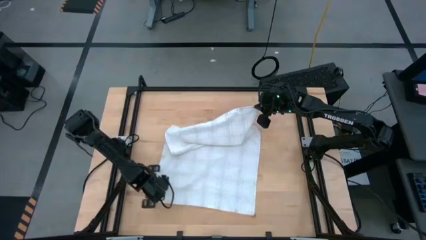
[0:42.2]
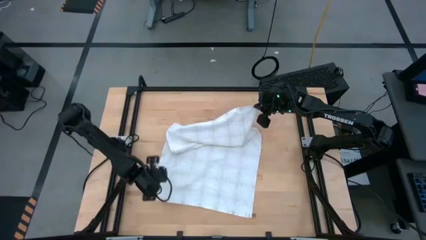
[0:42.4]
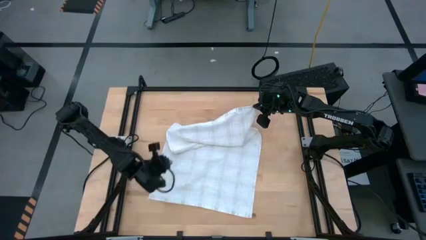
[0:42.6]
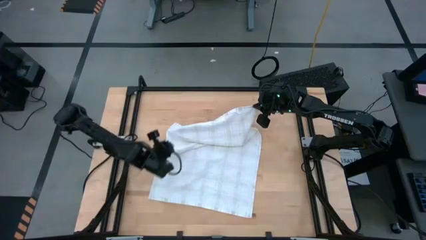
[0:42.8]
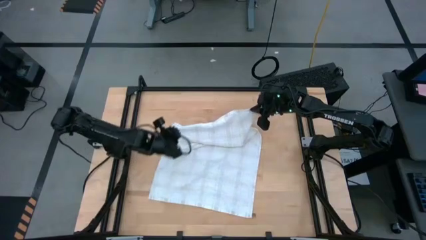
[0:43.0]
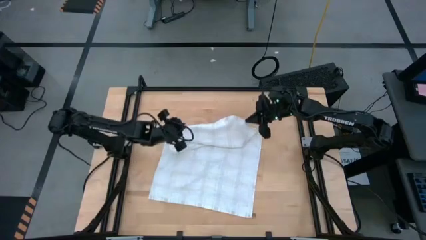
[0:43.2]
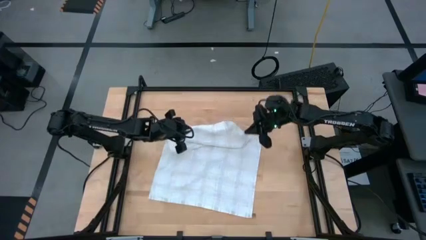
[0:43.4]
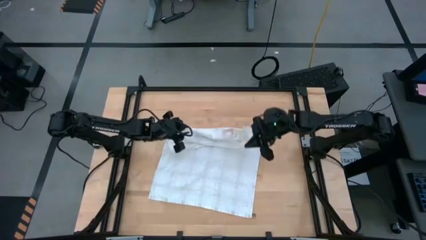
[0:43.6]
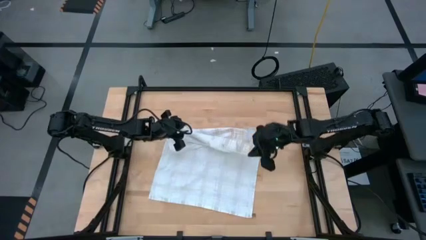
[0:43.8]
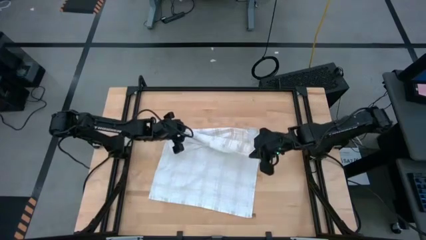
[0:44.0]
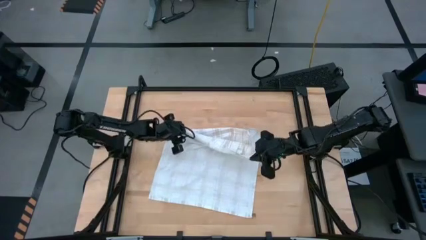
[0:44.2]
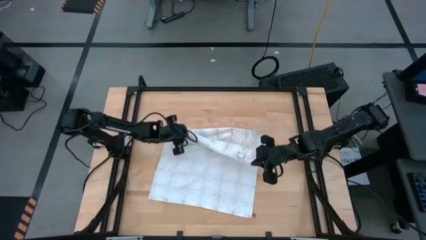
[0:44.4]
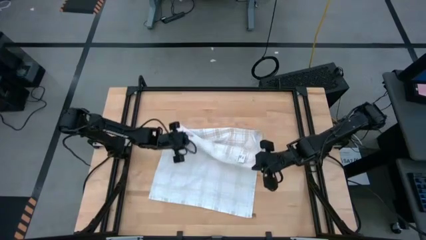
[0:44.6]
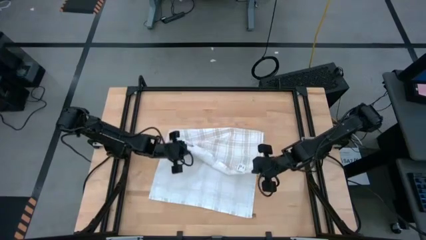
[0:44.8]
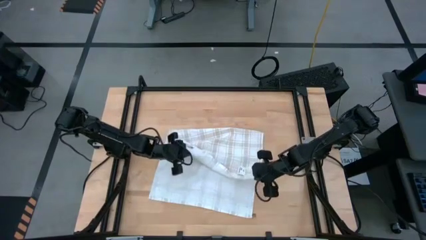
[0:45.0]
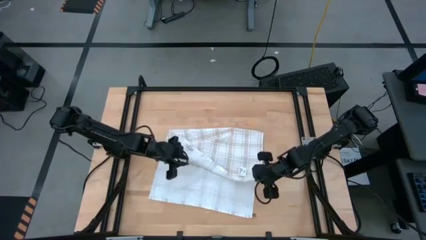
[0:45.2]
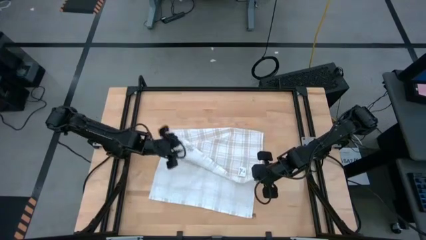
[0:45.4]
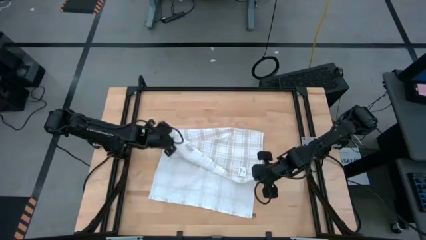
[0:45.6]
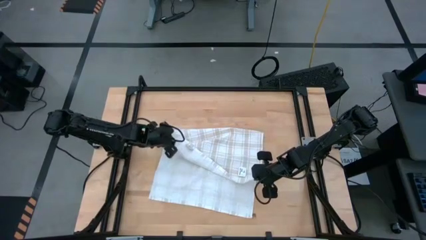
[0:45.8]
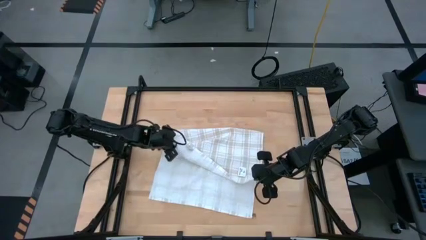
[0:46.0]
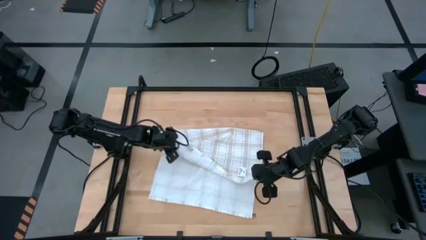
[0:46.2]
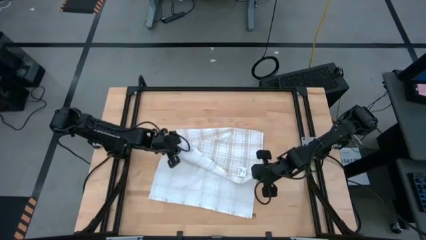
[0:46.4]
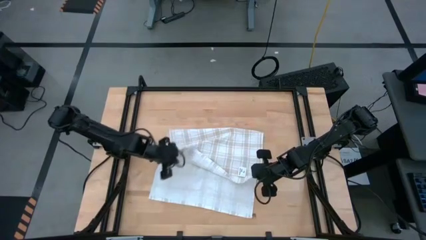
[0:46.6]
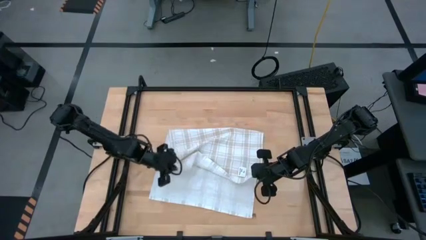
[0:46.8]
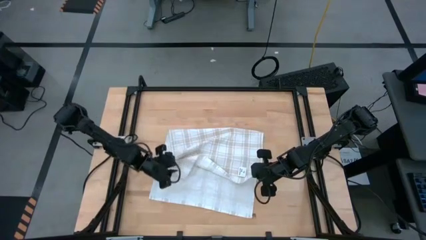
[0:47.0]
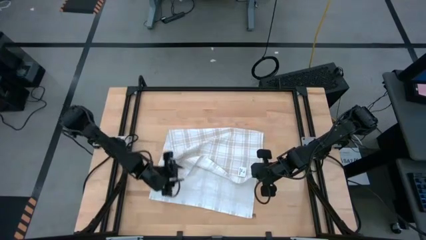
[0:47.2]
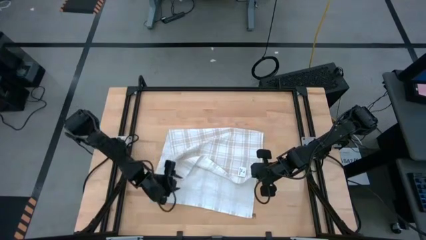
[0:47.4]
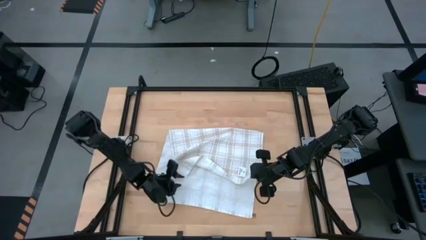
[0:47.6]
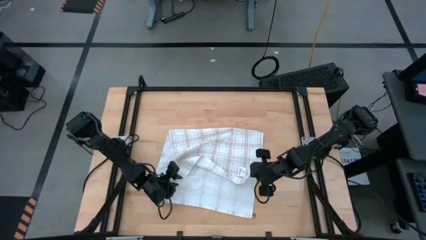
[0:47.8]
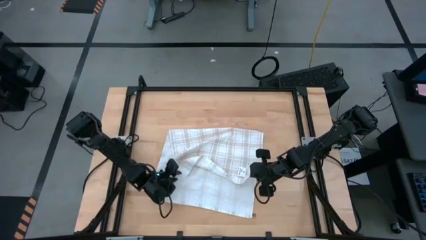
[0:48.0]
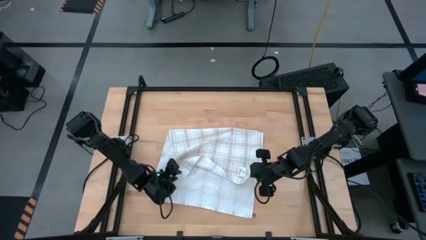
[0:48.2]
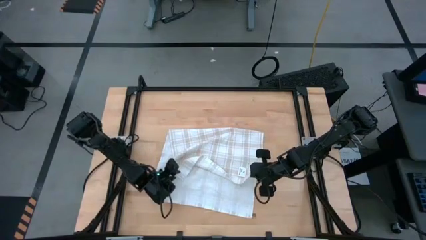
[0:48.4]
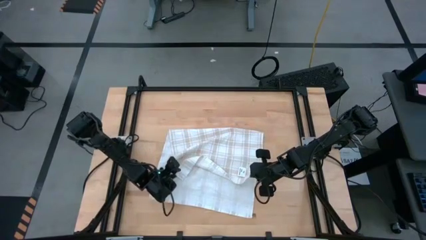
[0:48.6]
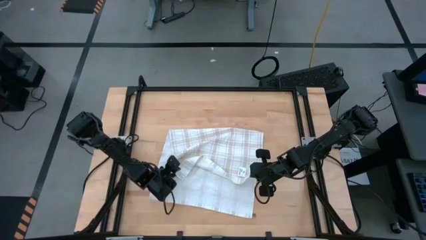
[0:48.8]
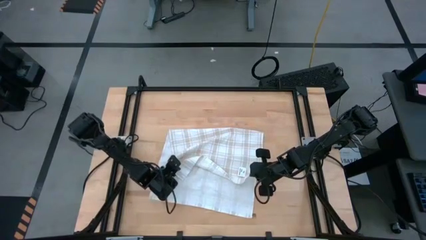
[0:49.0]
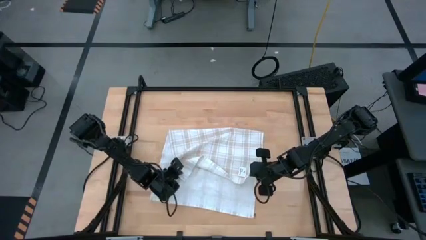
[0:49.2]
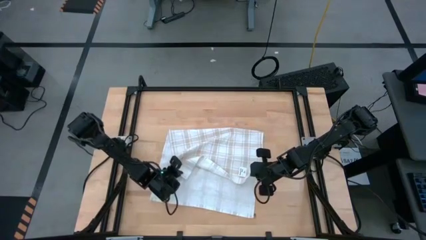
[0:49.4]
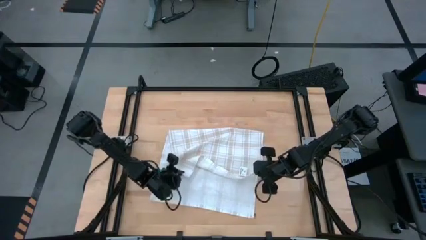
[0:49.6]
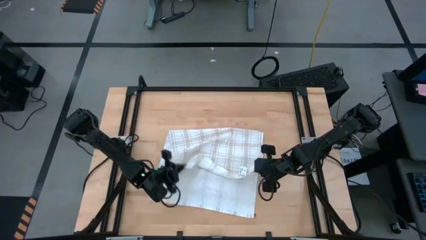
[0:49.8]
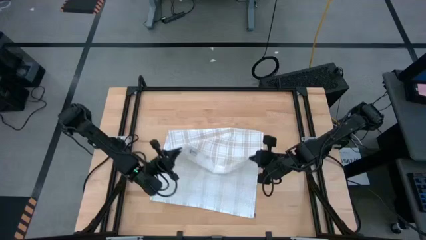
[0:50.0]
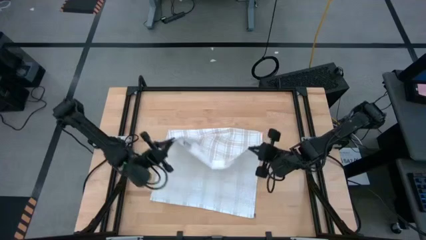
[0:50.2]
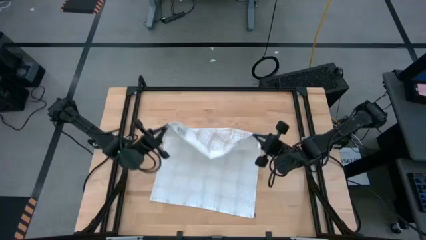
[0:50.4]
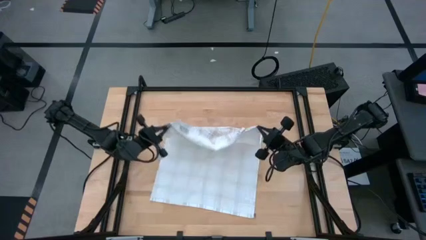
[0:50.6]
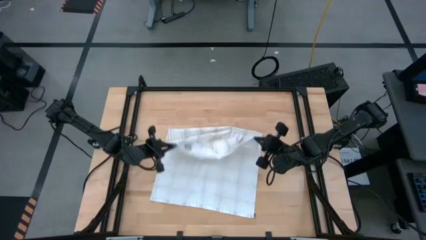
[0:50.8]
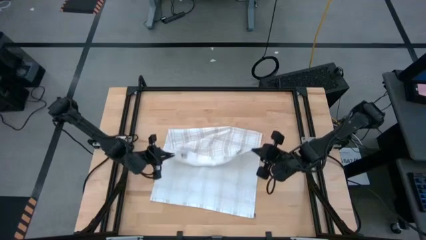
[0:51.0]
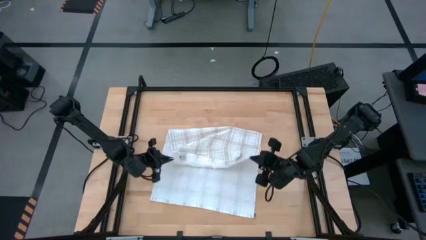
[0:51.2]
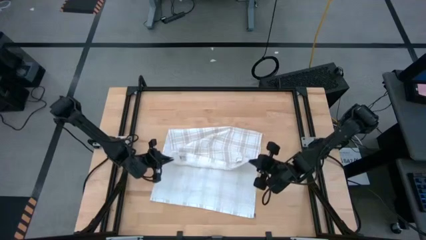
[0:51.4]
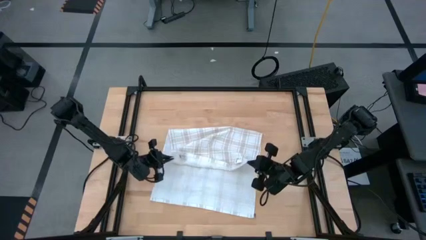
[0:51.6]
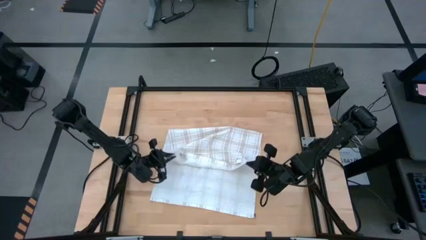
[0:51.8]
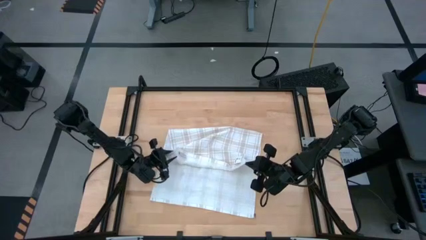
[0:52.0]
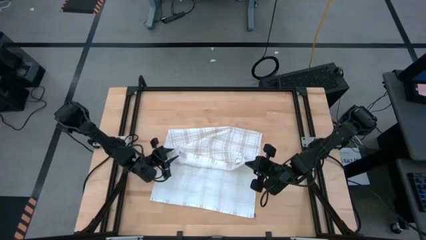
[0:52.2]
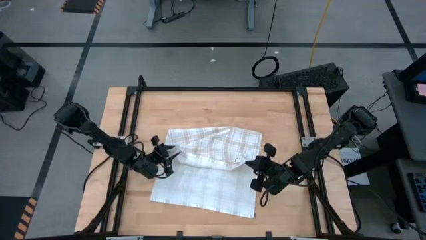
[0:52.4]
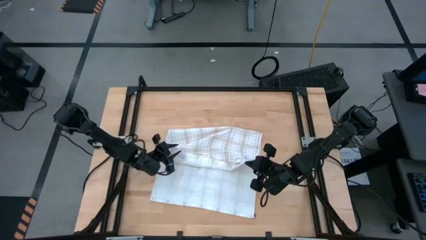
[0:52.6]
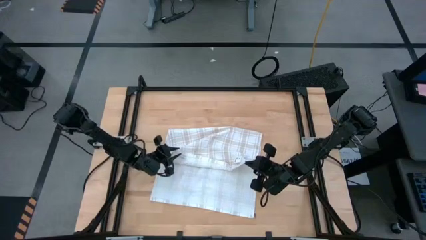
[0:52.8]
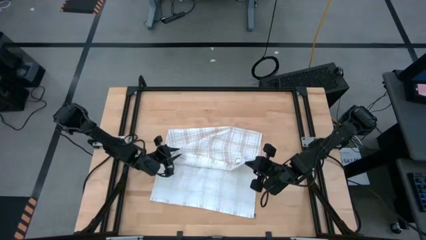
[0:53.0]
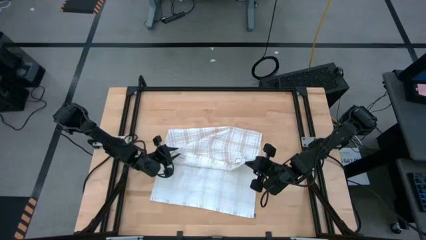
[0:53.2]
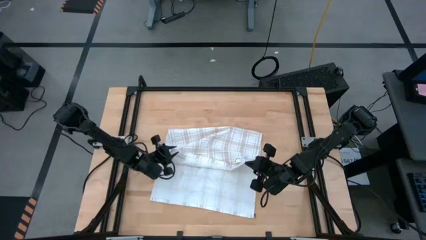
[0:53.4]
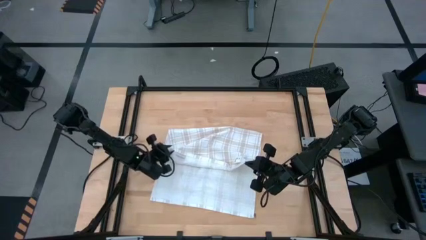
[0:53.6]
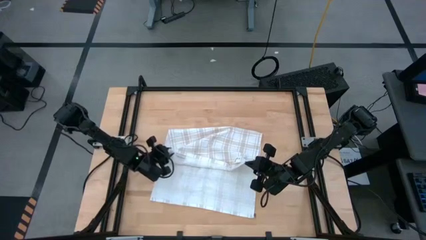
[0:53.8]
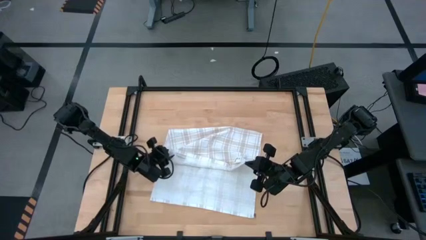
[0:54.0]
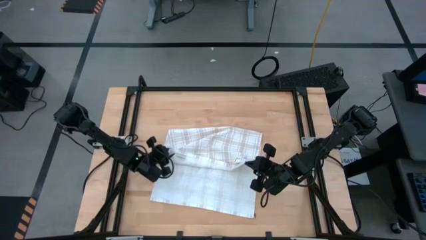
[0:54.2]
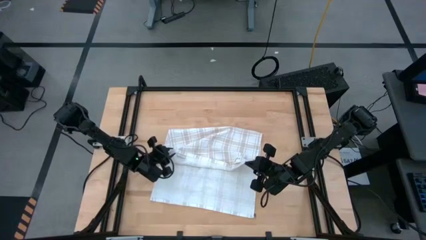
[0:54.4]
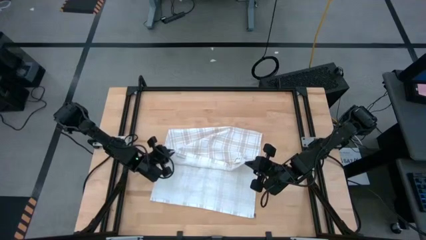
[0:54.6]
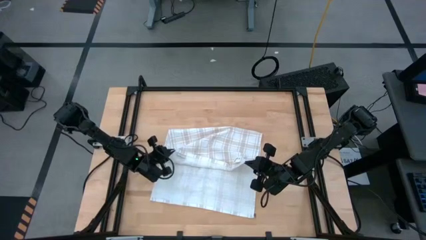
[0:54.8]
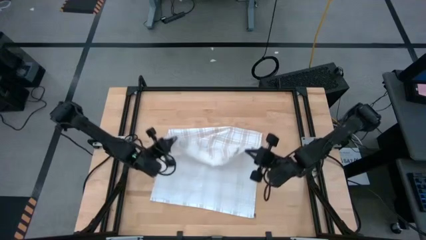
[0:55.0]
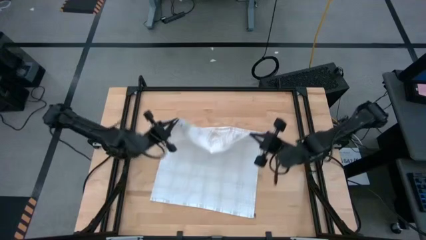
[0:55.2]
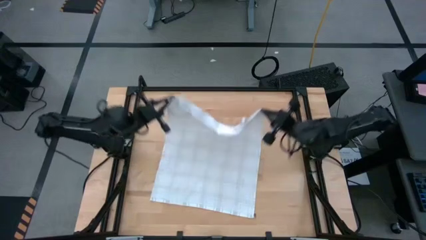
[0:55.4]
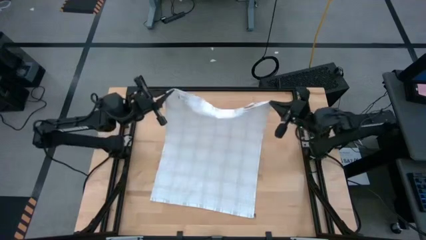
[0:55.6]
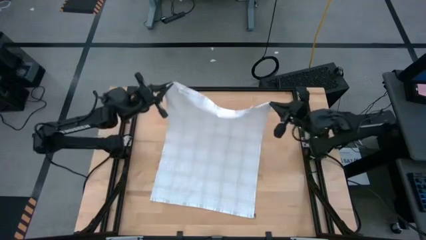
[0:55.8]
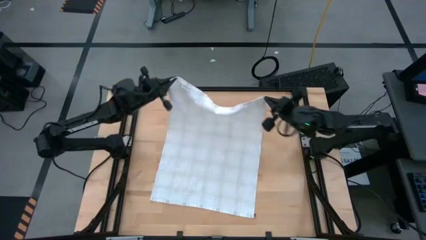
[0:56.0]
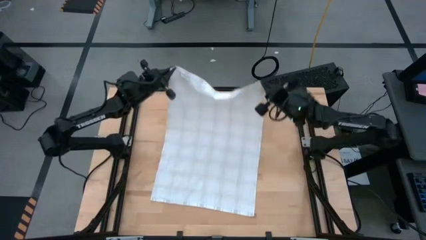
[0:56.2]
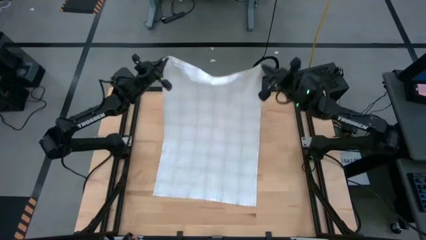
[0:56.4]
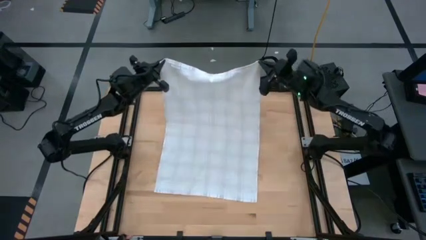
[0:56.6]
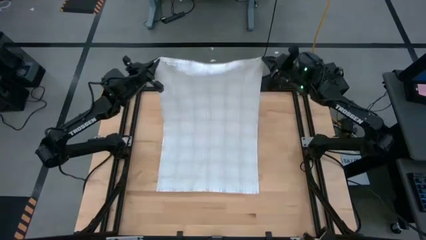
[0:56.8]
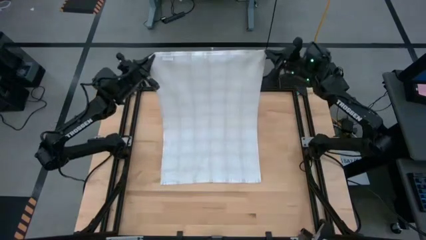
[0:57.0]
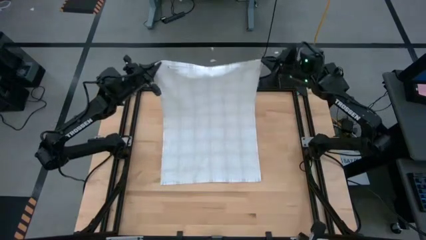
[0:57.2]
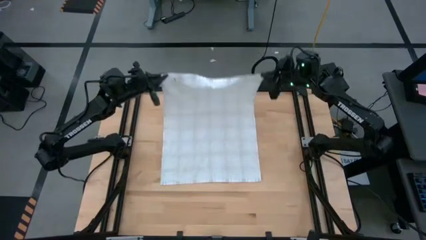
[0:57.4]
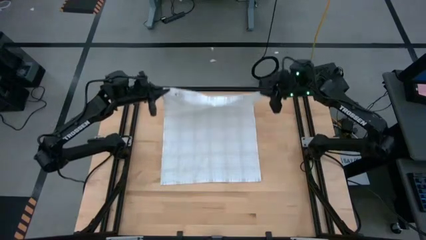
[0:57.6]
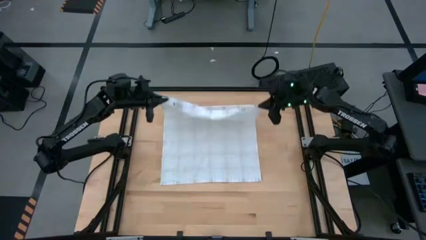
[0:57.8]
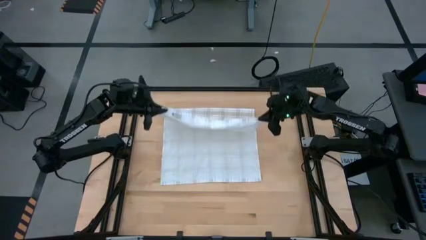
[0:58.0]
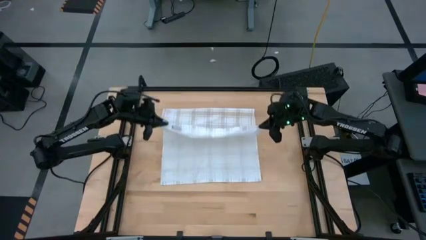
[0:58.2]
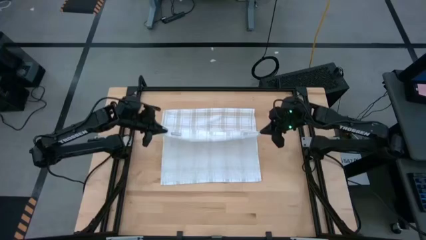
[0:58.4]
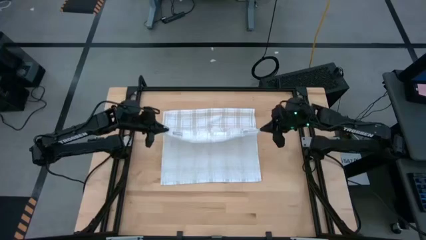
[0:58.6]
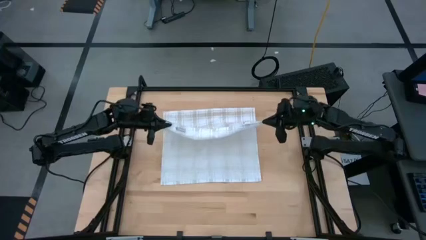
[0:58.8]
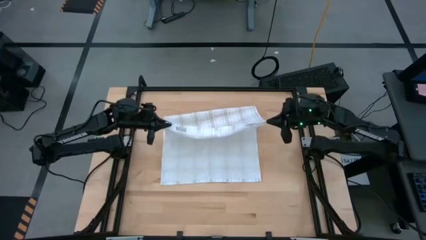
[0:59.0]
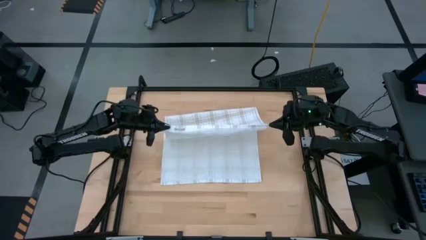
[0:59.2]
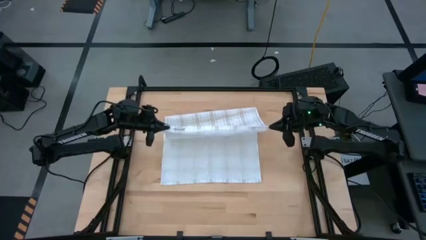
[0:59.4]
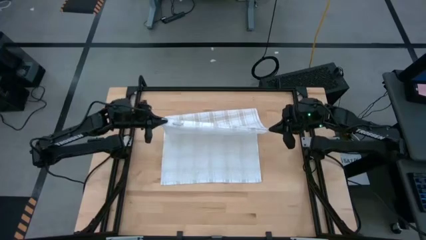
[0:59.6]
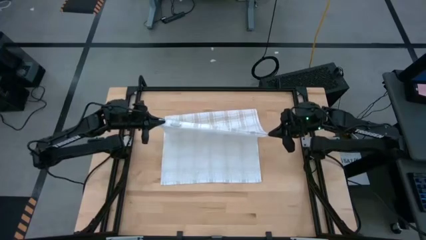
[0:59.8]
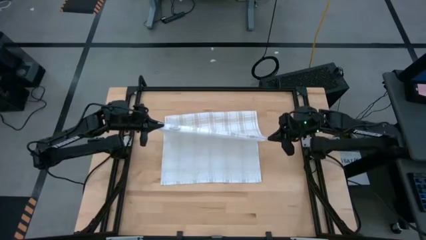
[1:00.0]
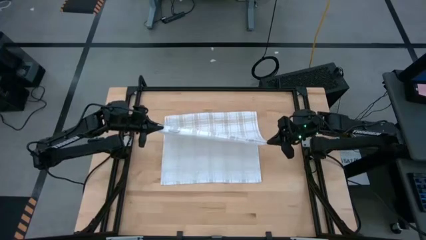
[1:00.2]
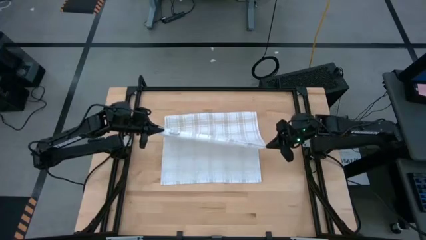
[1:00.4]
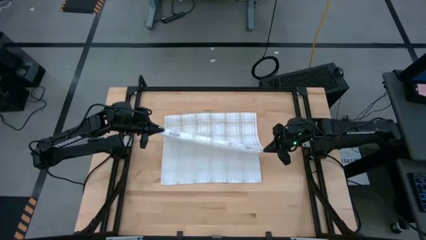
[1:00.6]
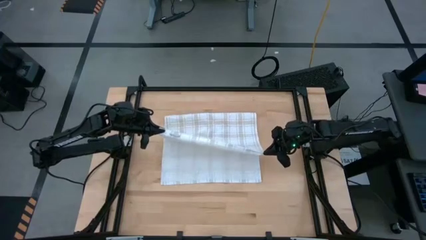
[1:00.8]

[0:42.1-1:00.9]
Task: Roll towel
Roll the white kitchen towel
